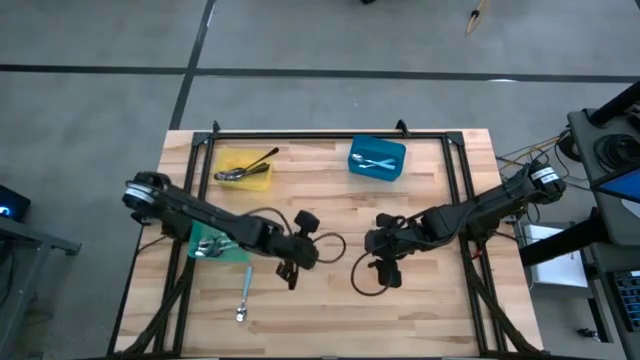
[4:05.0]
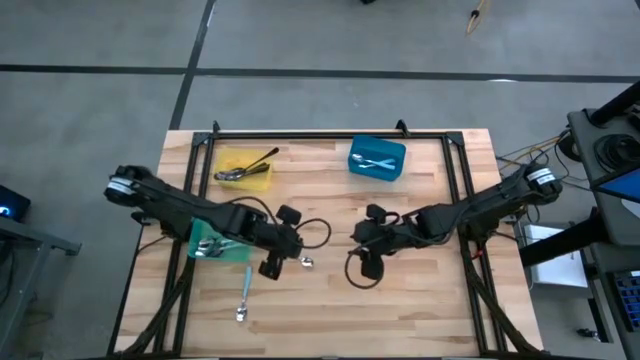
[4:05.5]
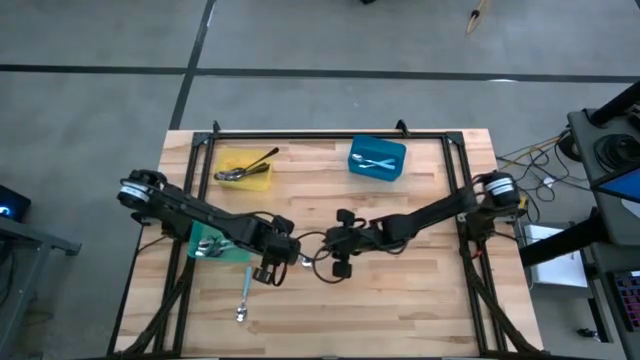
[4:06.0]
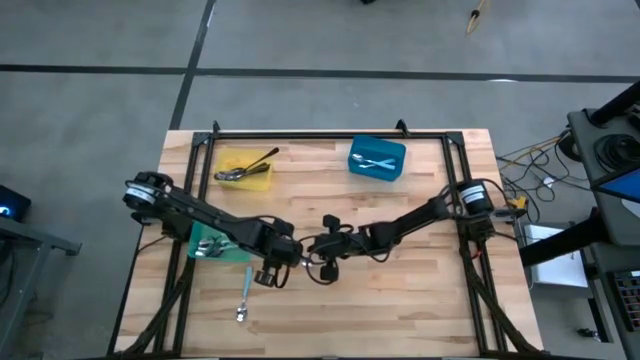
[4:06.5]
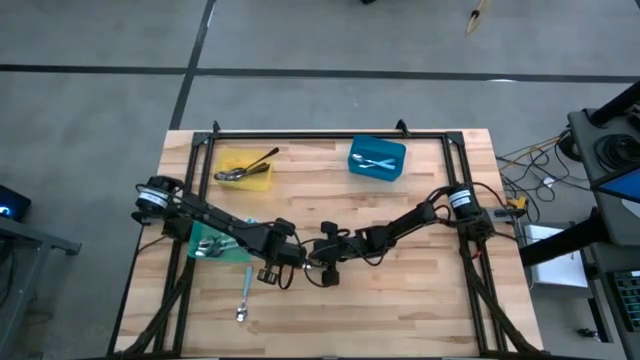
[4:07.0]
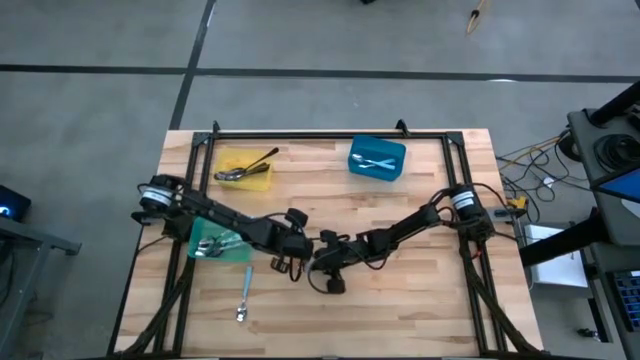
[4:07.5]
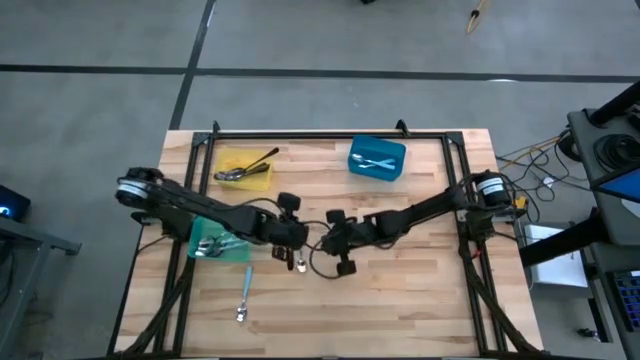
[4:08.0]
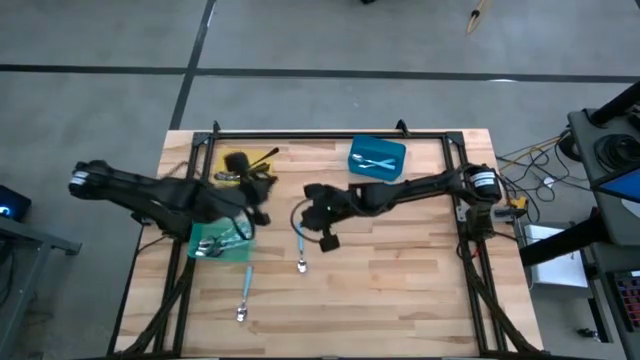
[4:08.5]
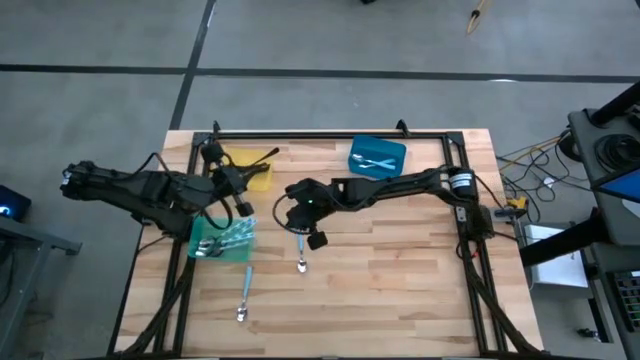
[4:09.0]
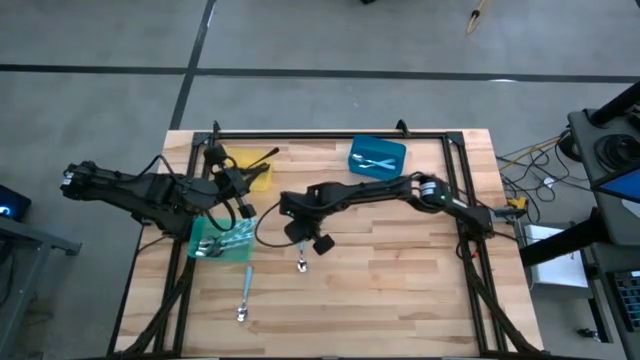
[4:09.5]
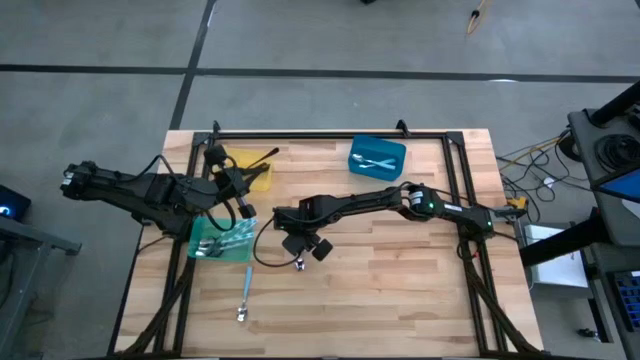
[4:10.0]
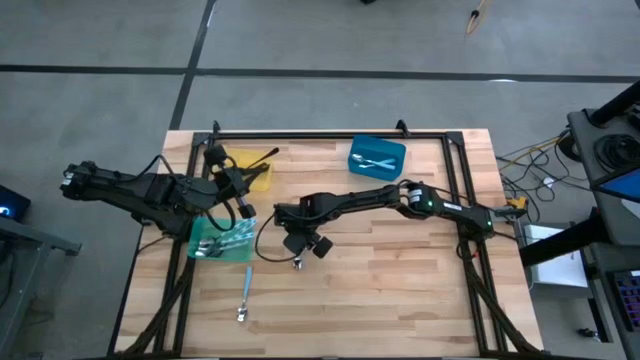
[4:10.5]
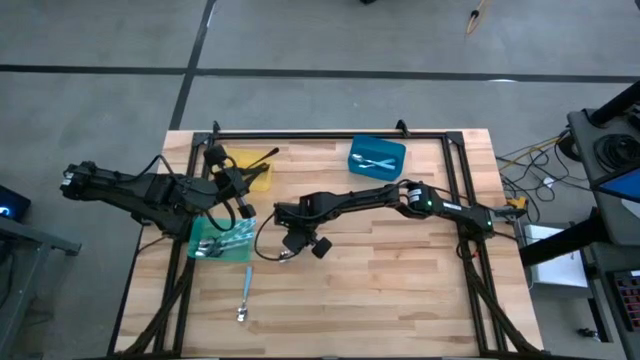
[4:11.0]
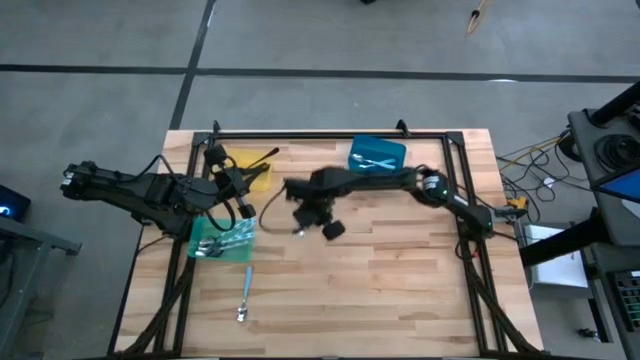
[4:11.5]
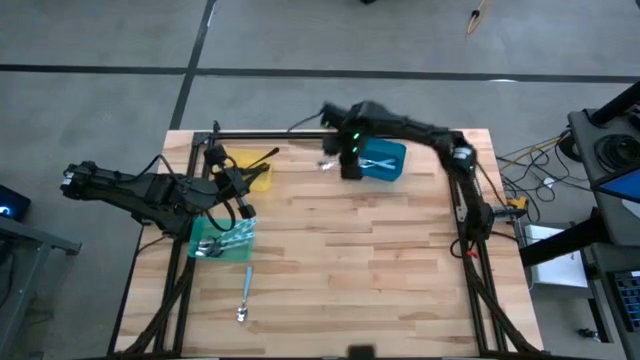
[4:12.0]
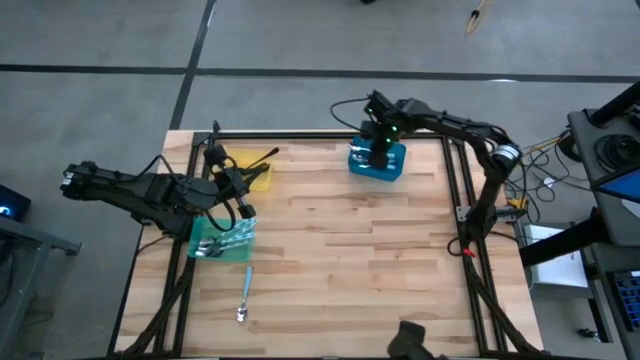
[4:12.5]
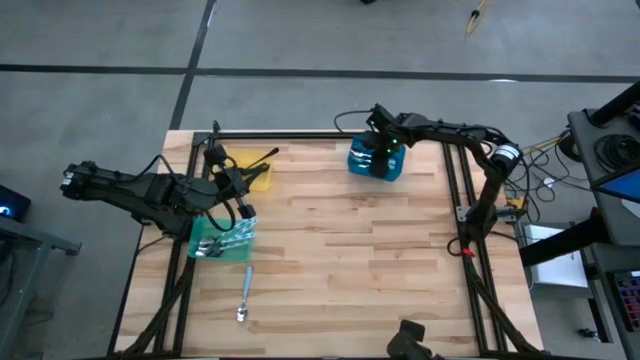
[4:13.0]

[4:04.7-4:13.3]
Task: Sort silverware by color (type)
Put the blue spoon into the blue bin

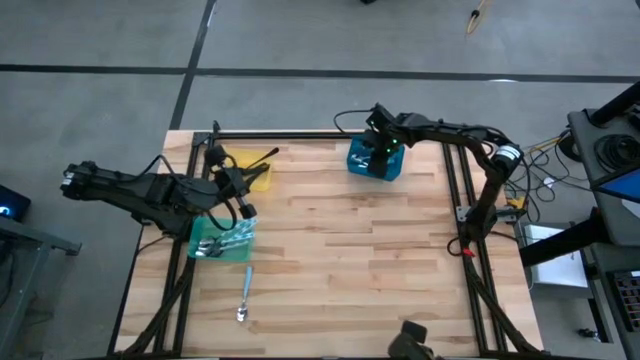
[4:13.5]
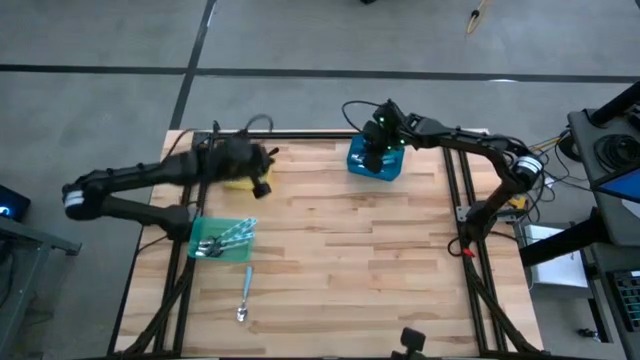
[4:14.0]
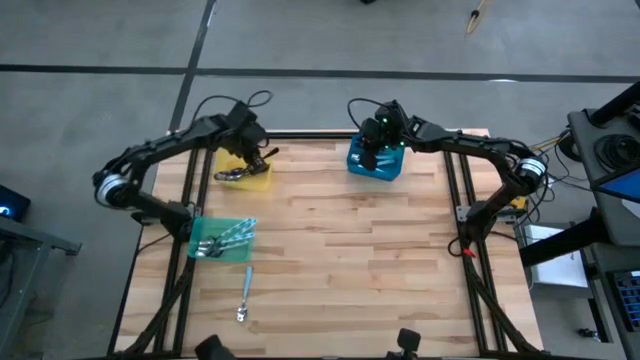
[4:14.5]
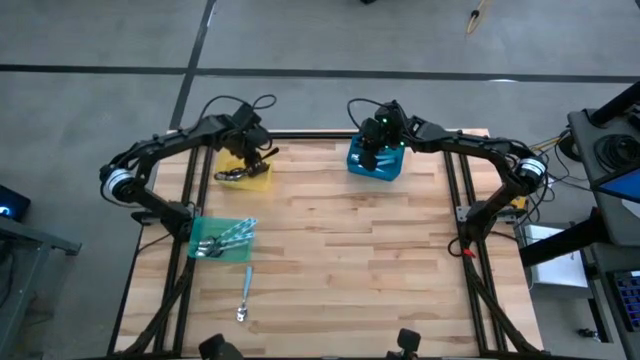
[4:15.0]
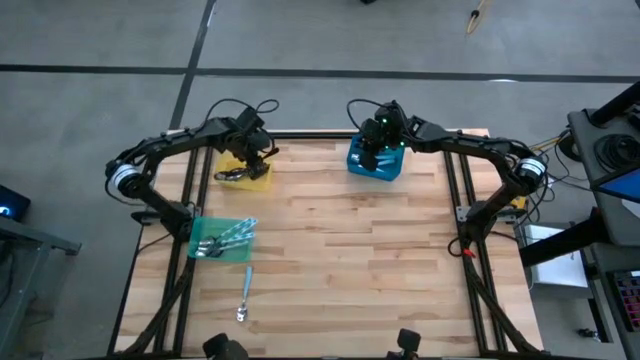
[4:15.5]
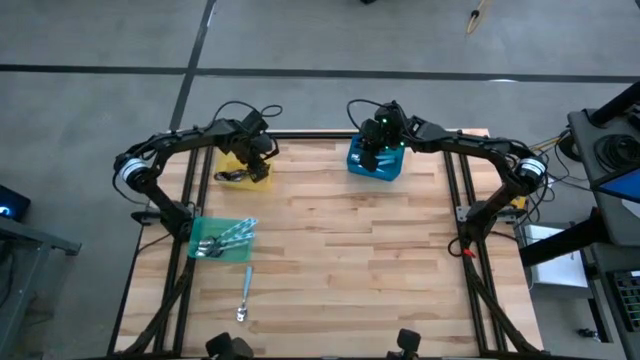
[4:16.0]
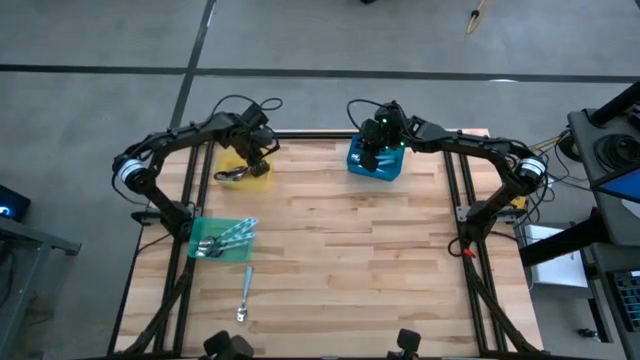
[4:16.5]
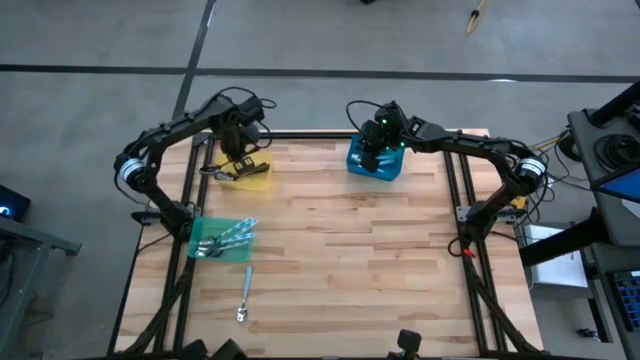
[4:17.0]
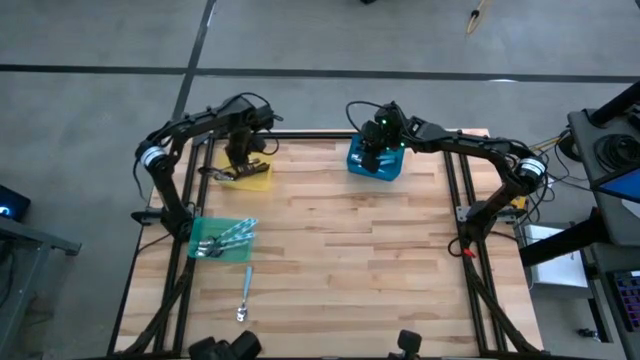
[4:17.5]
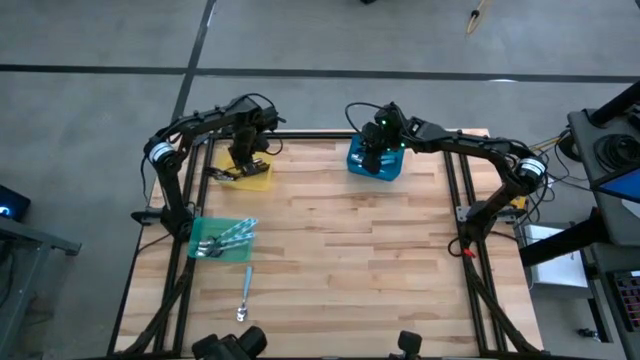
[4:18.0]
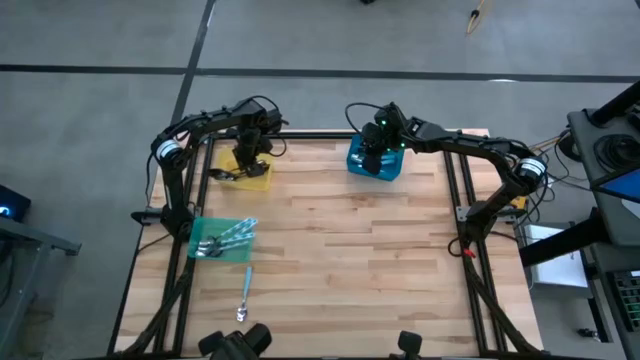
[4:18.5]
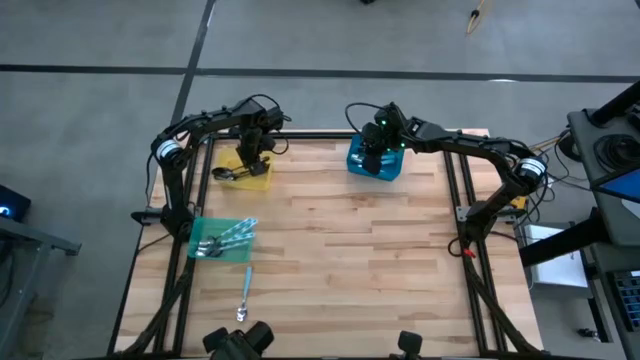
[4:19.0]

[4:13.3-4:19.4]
Adjust the black spoon into the yellow bin

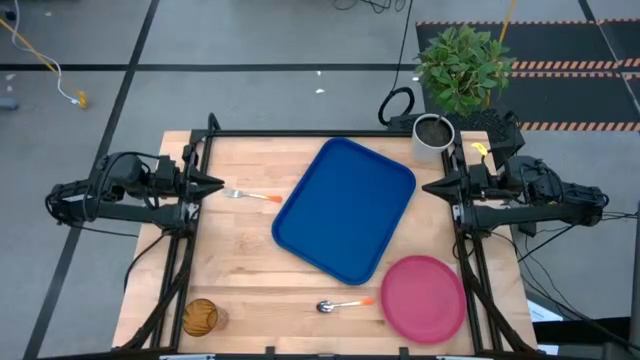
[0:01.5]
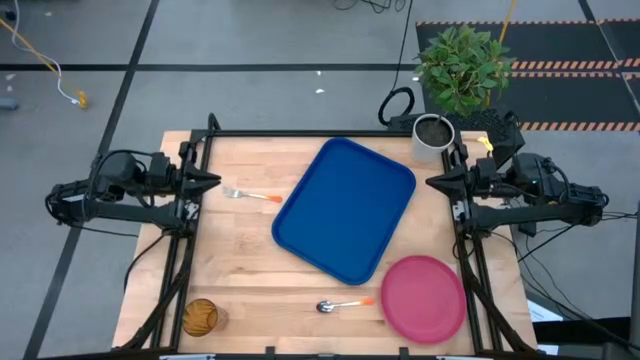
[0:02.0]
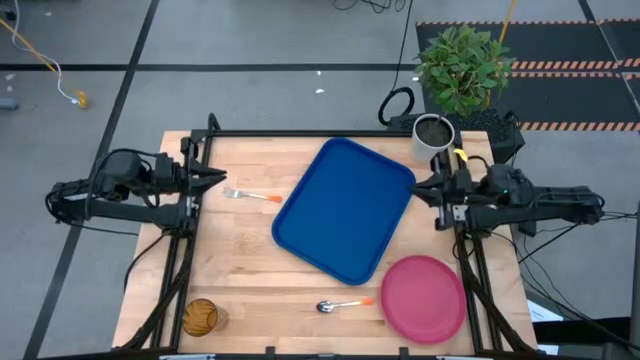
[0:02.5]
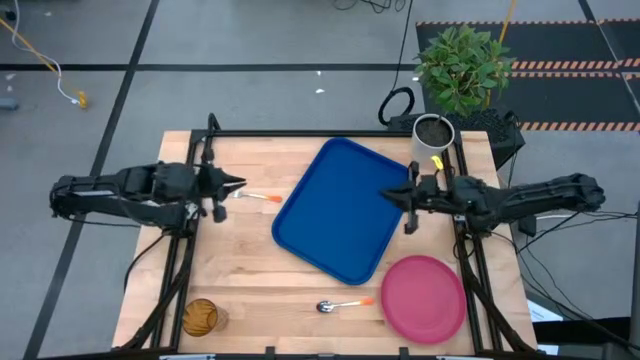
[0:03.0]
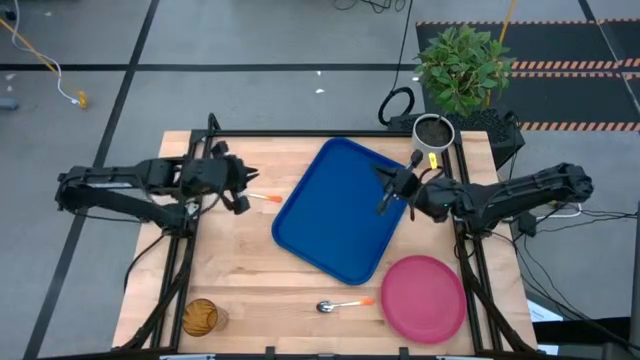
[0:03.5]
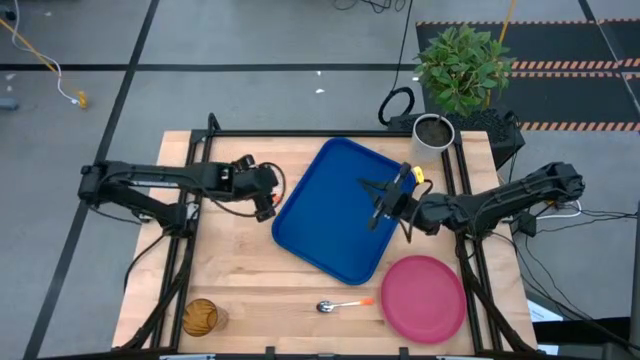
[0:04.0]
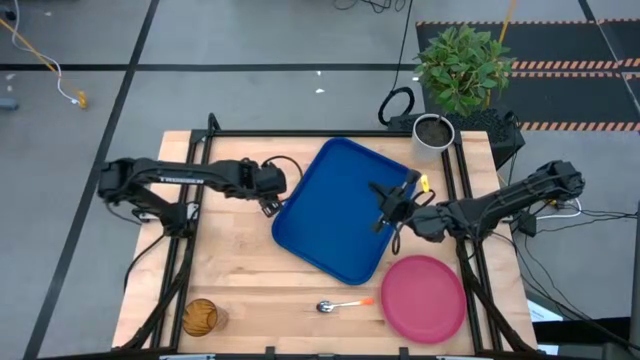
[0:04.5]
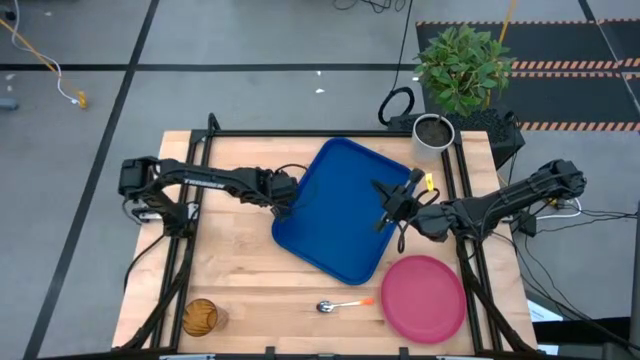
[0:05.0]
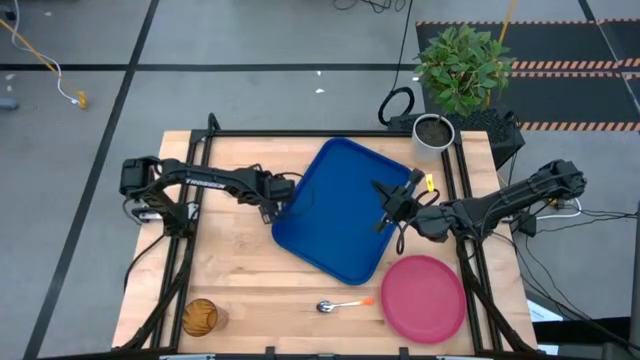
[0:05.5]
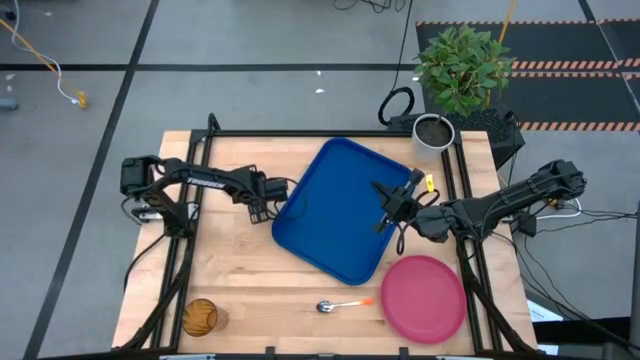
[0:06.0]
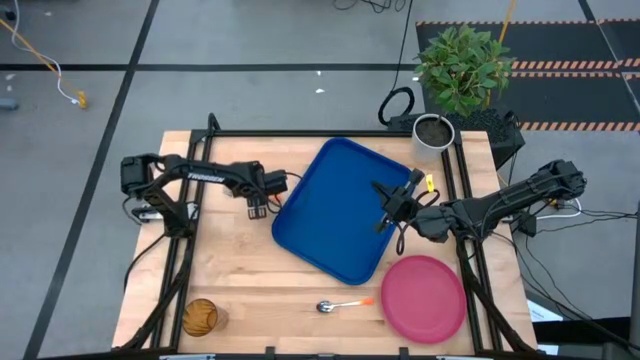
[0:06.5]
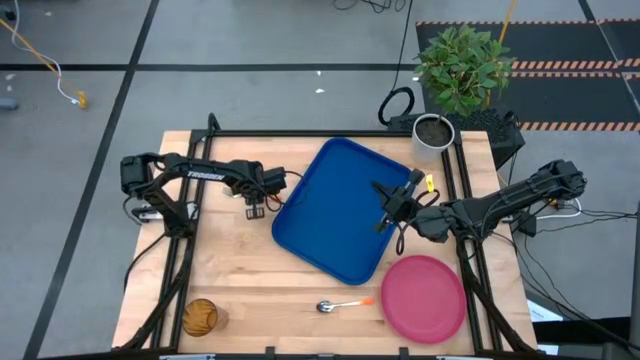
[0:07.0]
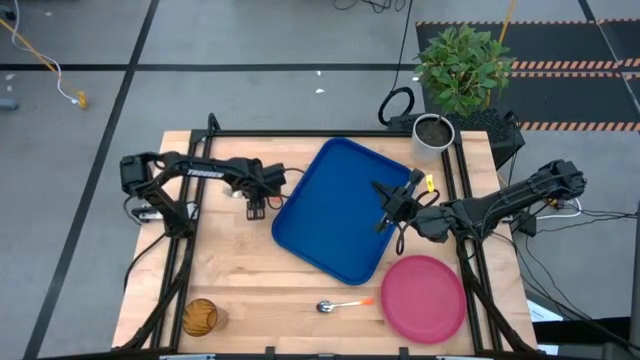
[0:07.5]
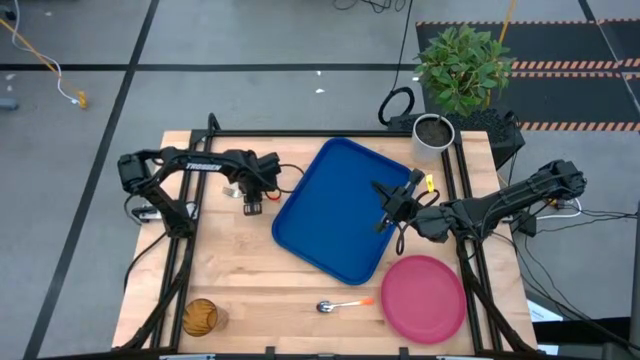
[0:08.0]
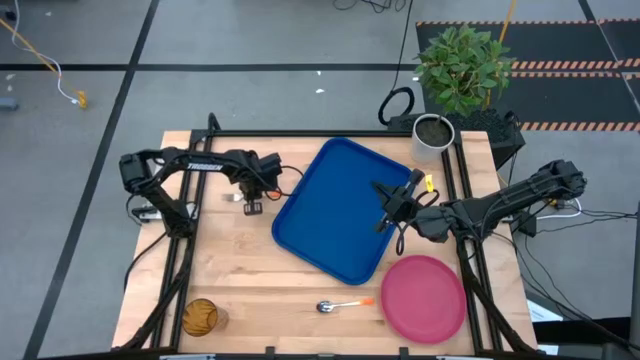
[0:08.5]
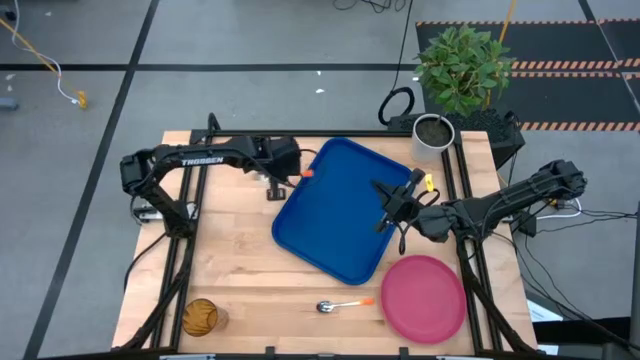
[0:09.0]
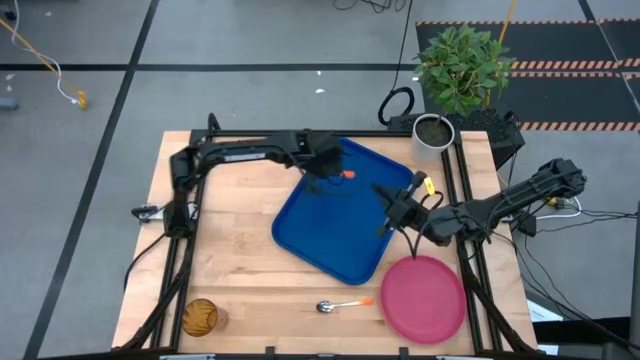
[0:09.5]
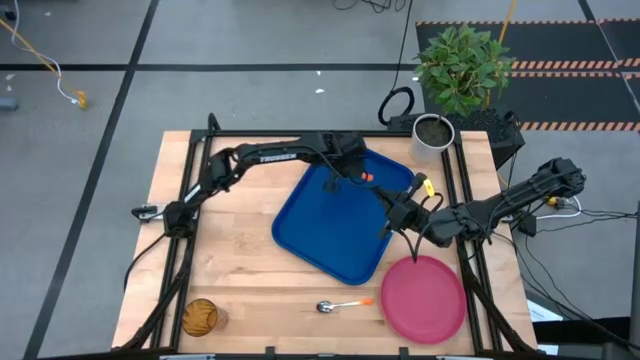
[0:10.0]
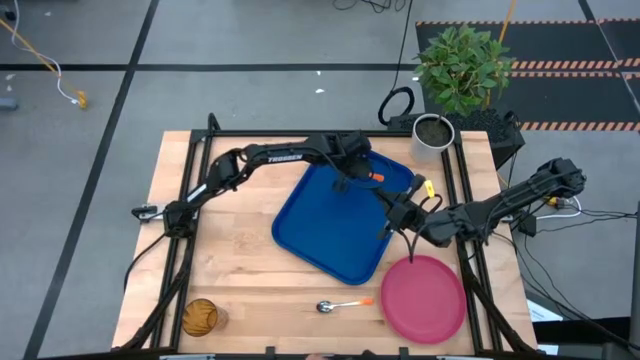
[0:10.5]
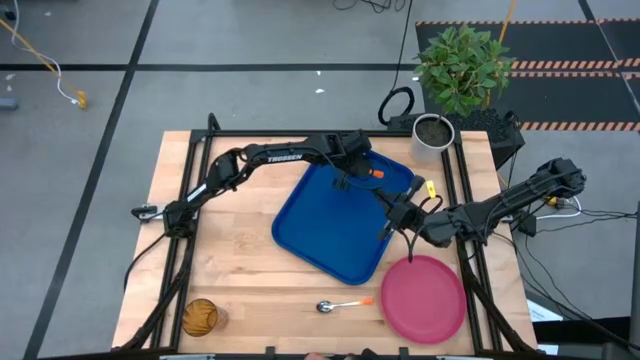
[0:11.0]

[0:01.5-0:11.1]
Task: Pick and place plate/cup/fork/spoon on tray
Put the fork on the top side of the blue tray
